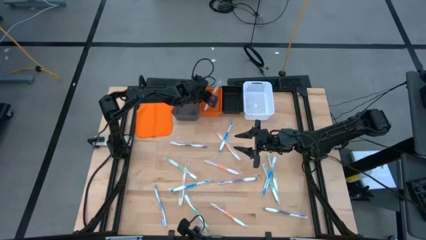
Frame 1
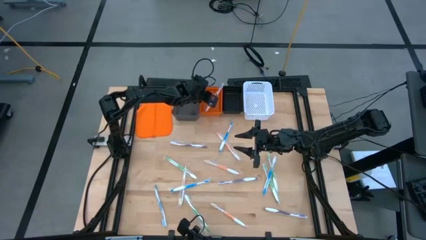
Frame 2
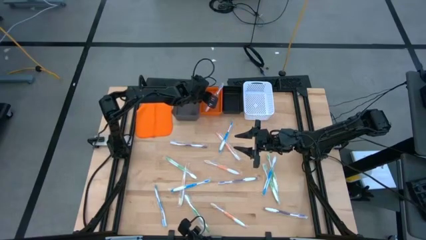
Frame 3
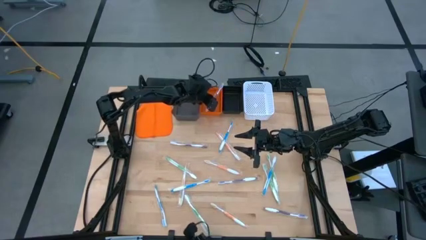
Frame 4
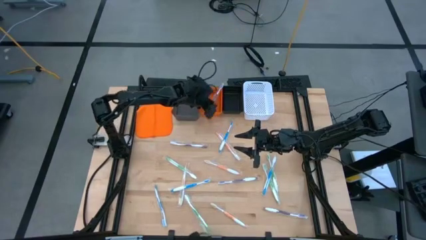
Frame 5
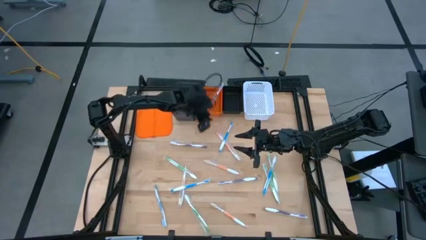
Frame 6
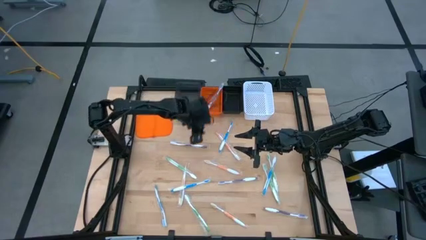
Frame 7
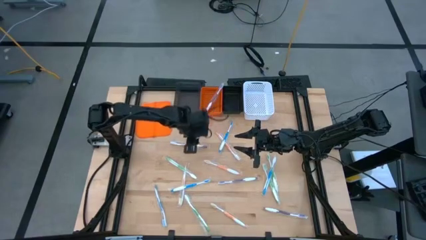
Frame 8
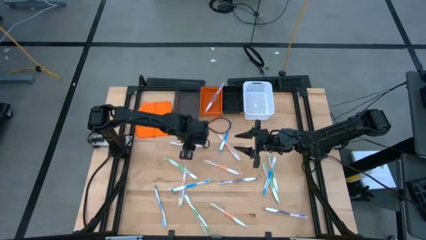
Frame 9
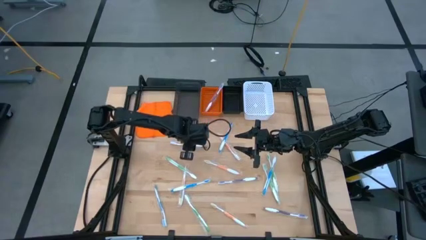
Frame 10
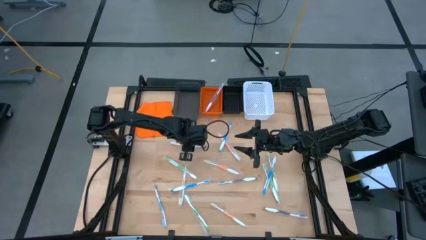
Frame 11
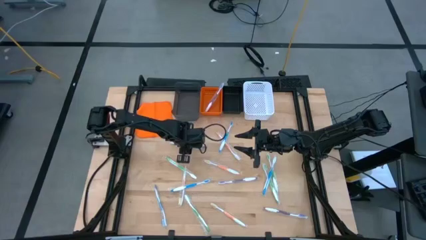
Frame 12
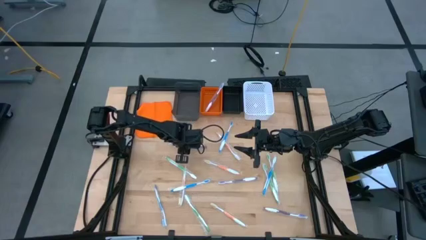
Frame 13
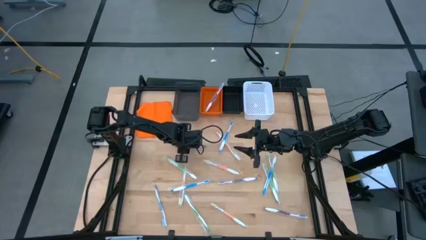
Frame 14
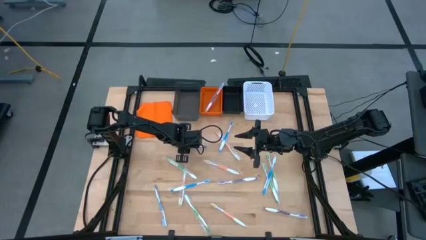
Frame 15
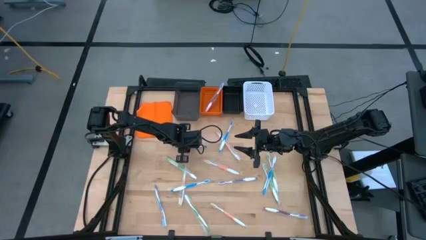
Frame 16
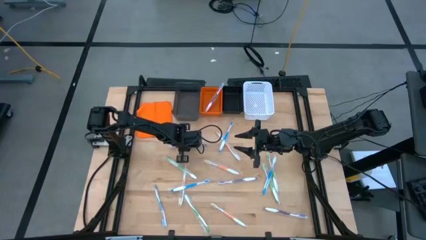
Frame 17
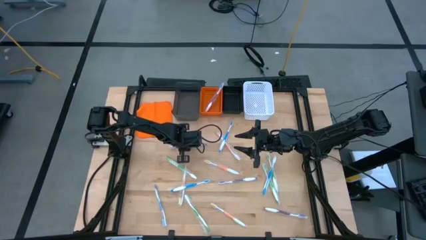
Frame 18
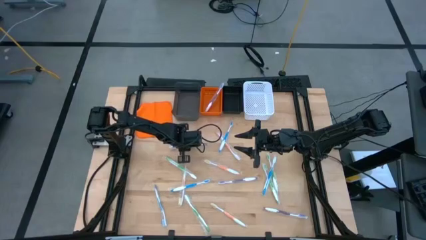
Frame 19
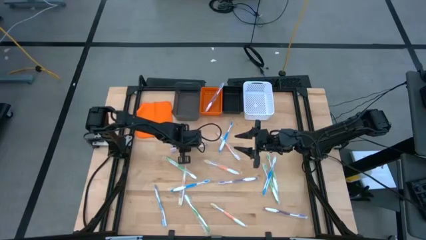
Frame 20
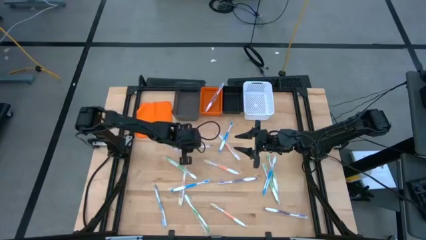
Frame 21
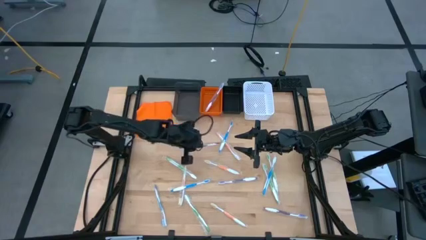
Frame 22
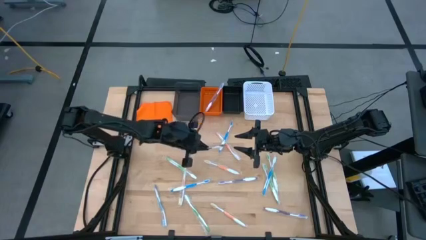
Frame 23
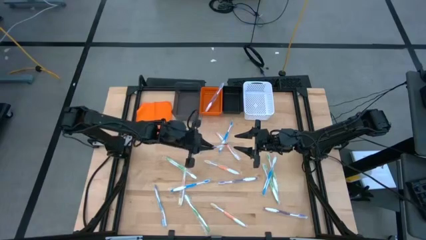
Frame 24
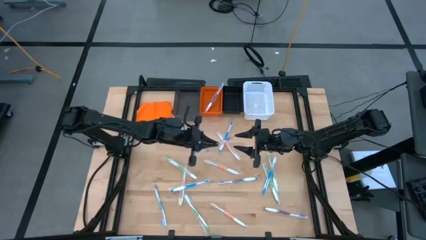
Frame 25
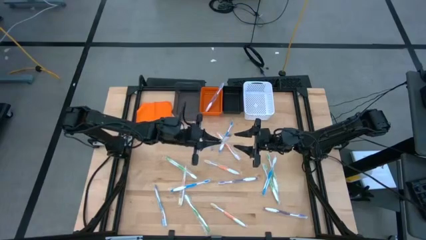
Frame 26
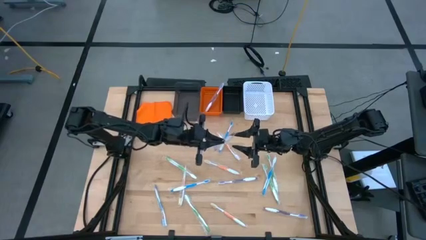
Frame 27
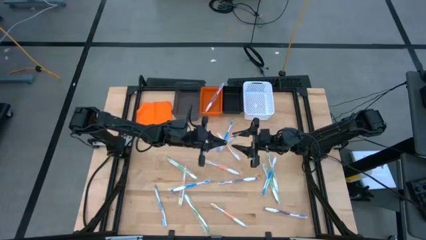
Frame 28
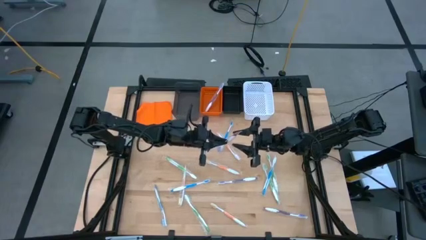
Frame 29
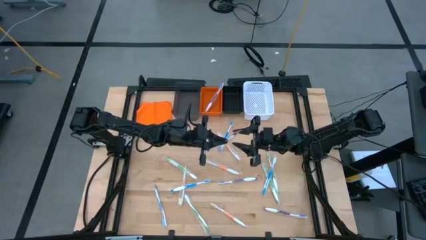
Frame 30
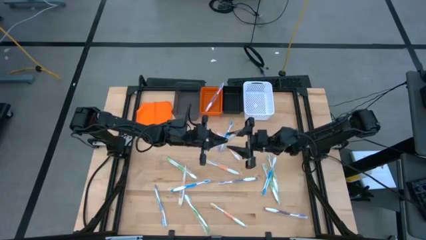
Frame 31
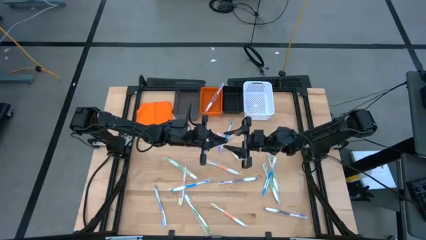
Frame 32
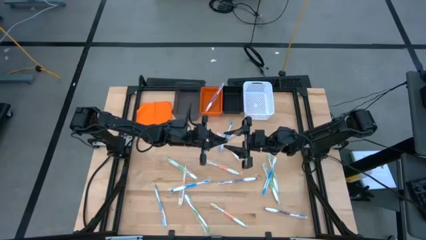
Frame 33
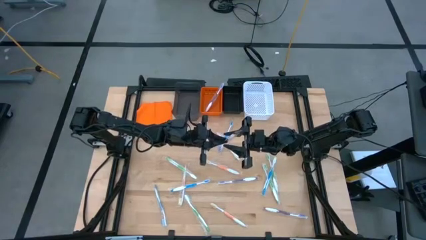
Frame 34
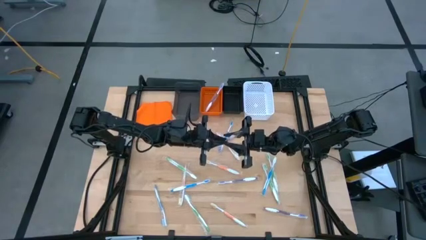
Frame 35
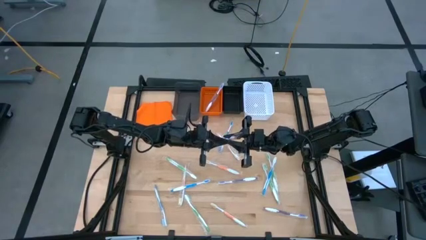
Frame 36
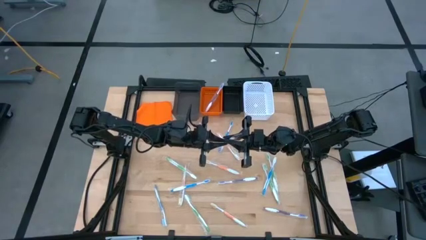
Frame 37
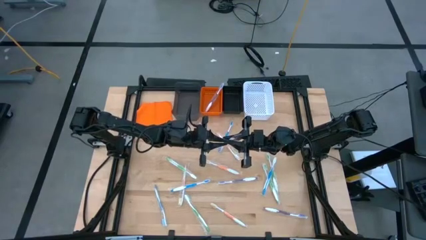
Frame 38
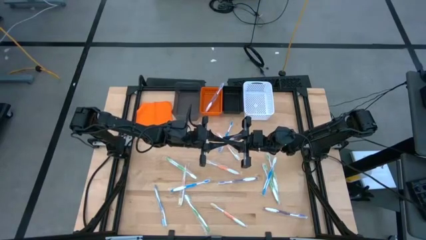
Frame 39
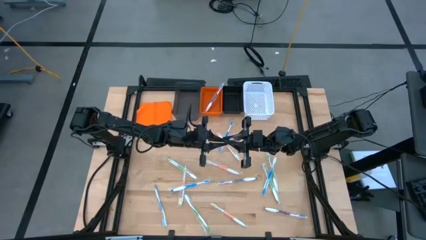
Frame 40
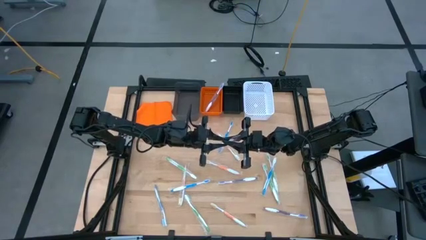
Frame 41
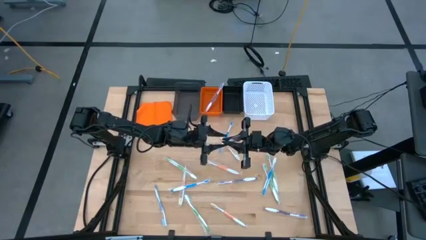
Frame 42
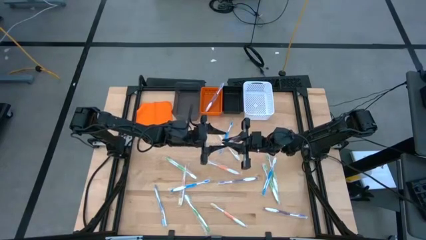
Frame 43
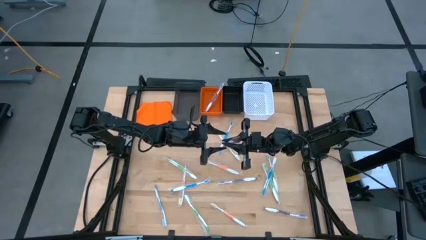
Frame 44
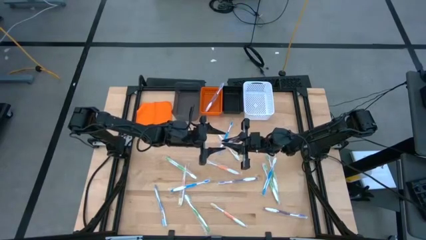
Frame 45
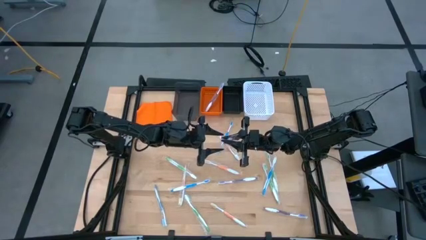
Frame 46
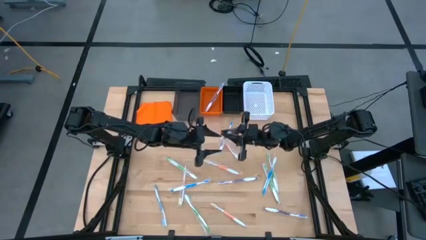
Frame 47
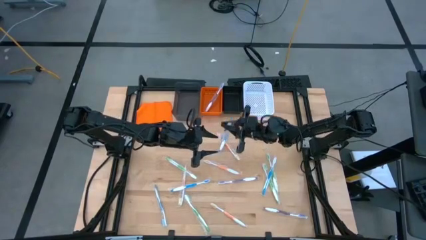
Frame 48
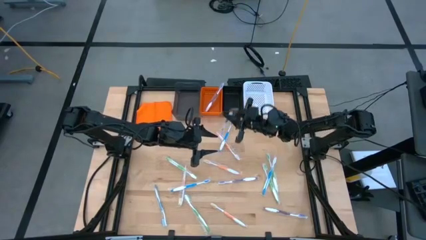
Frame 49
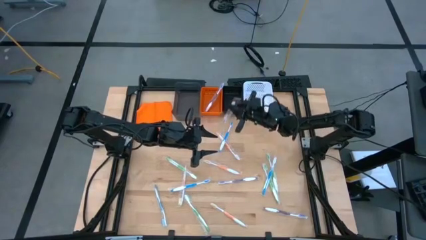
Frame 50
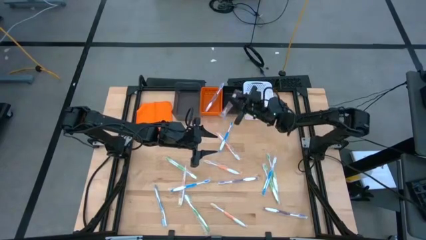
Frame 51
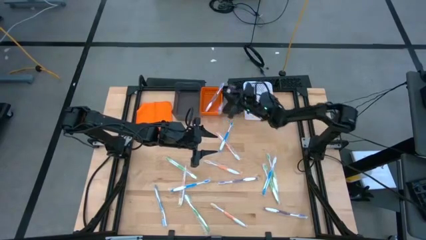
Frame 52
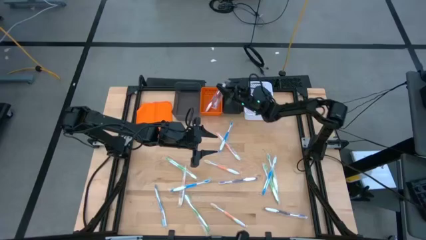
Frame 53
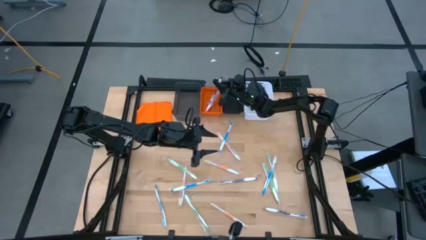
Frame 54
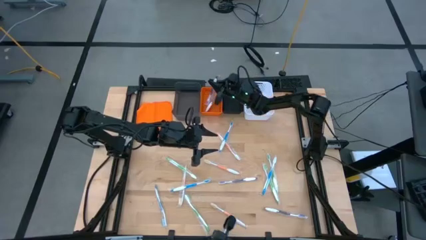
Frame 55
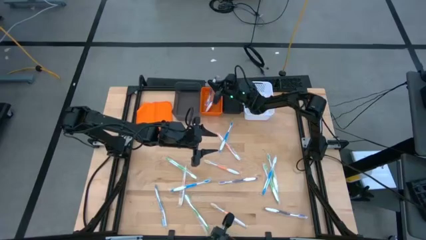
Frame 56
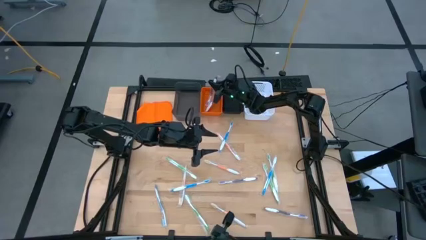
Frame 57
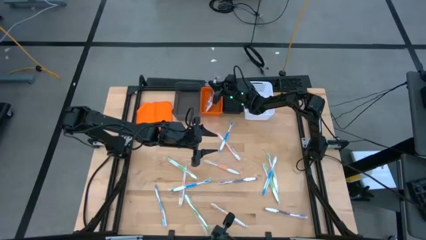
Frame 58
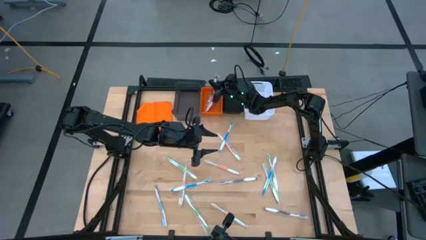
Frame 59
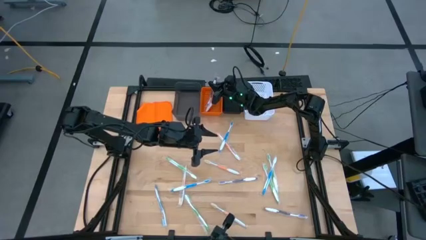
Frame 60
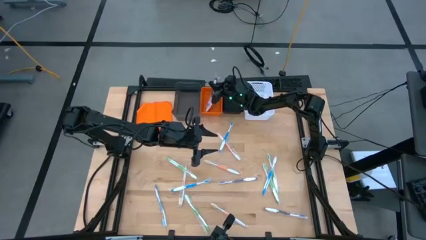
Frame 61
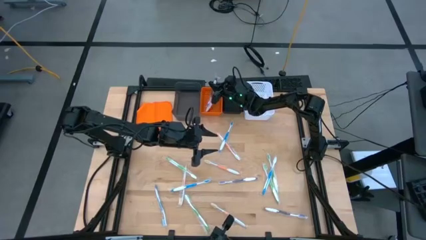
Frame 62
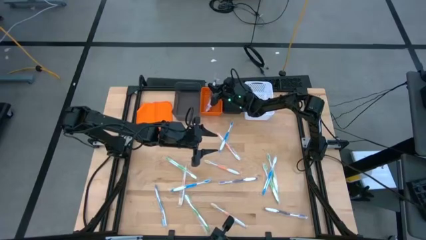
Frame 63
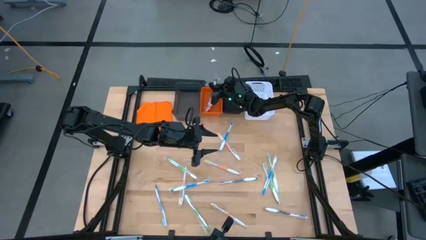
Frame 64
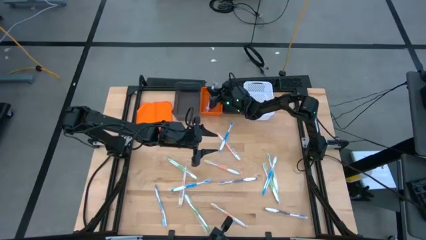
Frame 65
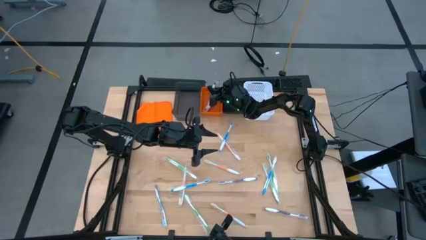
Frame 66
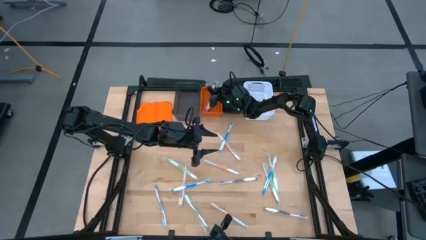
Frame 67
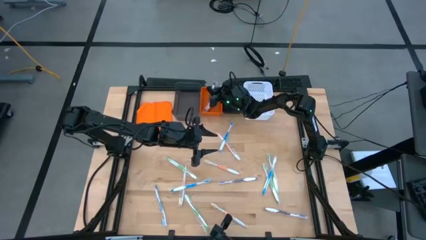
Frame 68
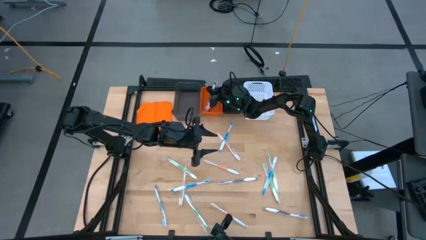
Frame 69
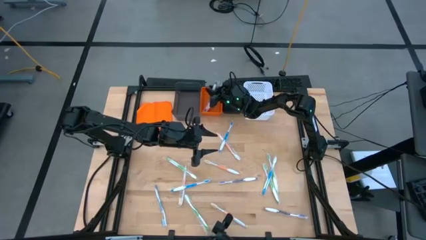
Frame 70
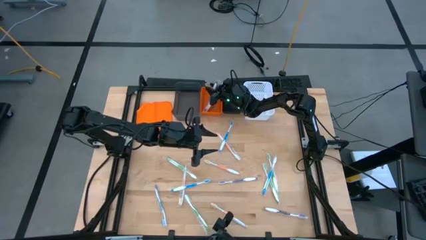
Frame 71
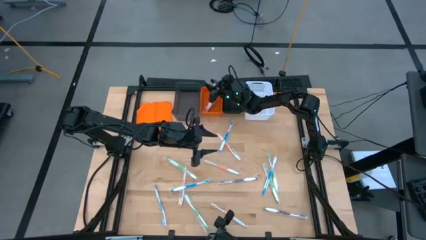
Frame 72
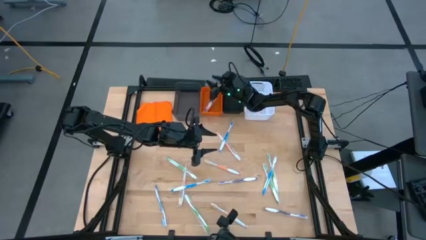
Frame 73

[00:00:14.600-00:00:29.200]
Task: Pick & Place Toothbrushes
Put the violet toothbrush into the orange bin
